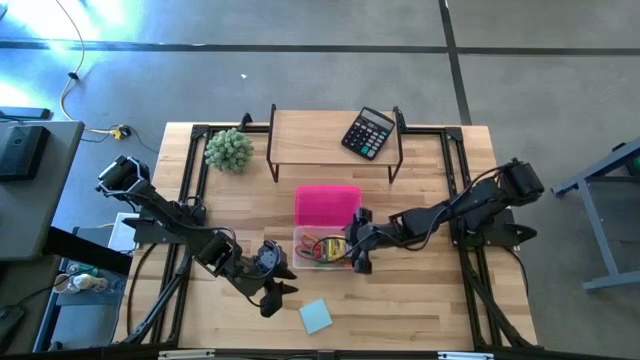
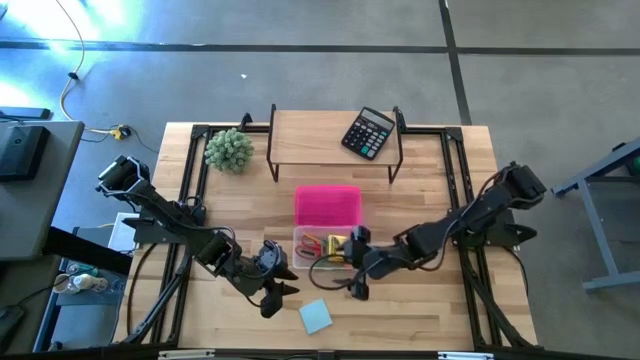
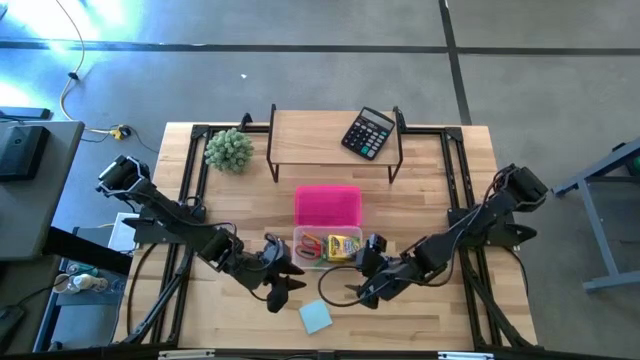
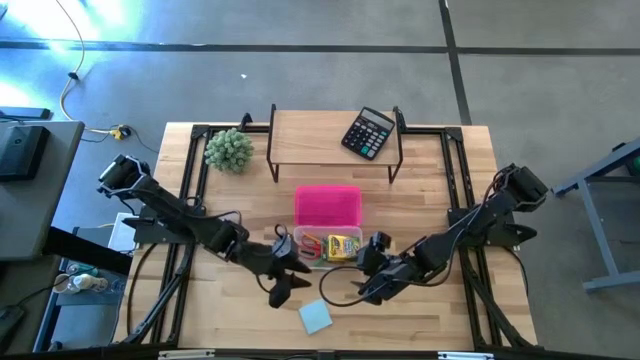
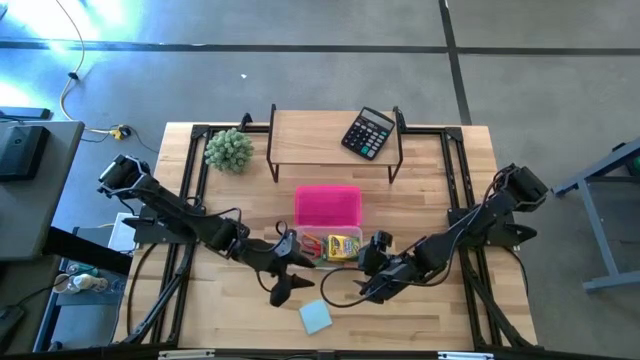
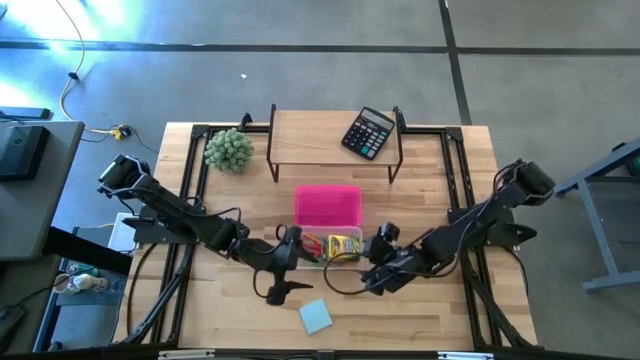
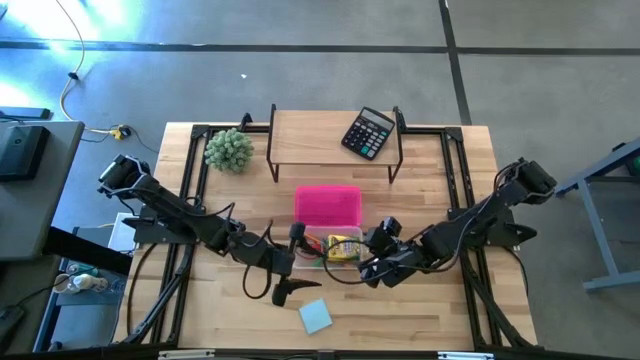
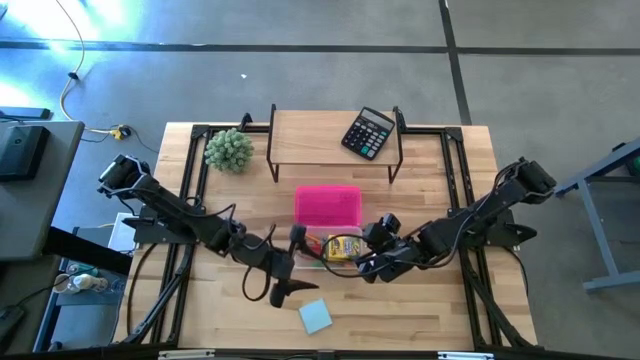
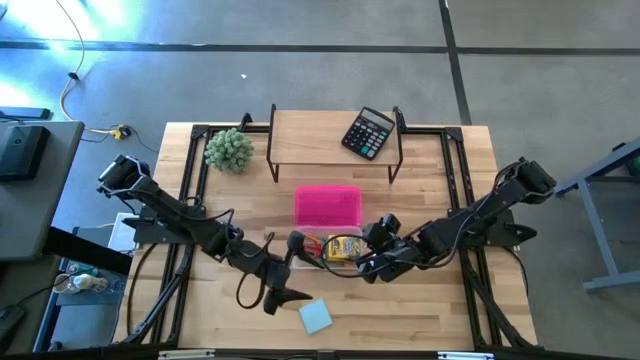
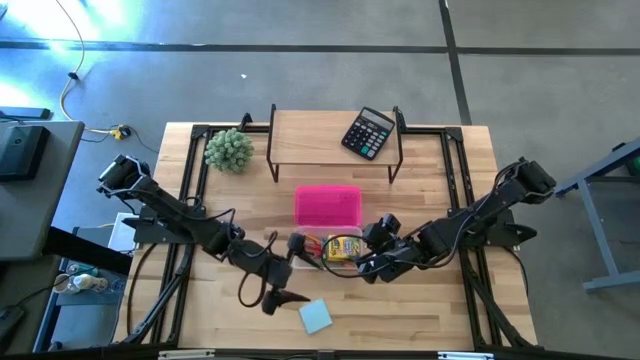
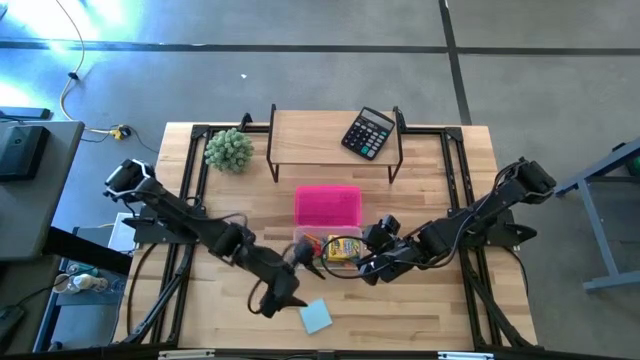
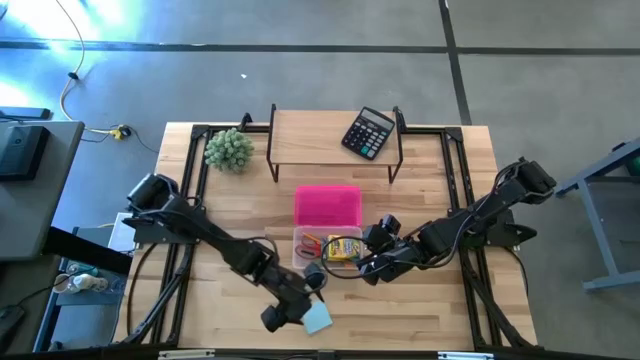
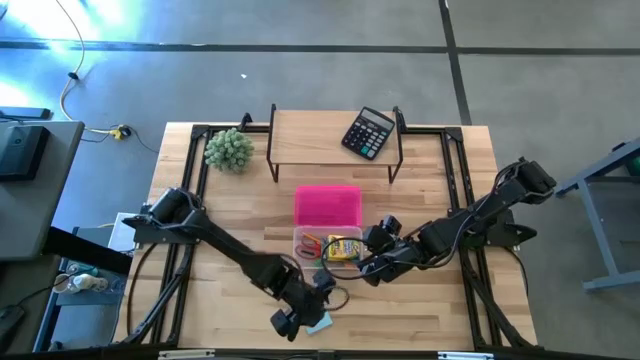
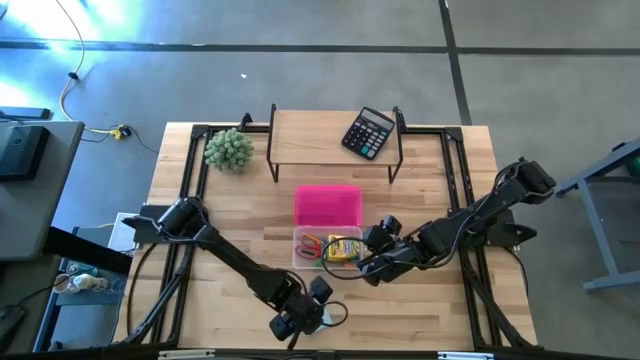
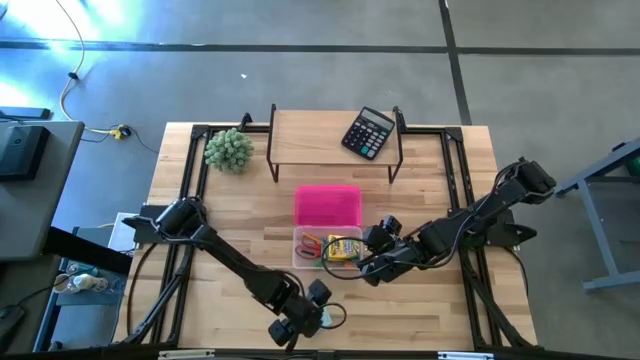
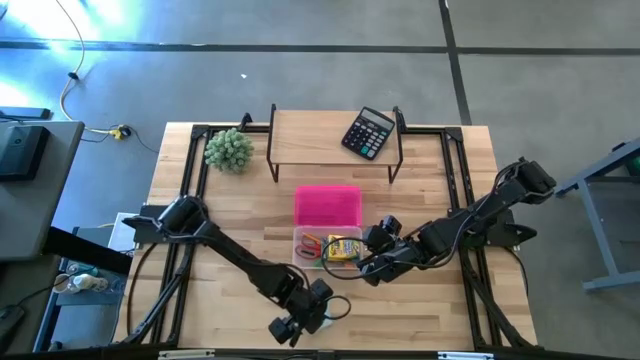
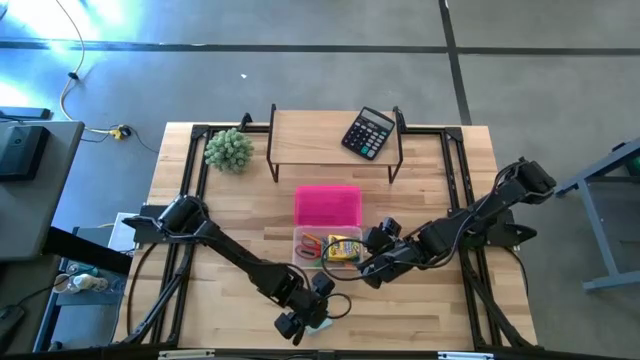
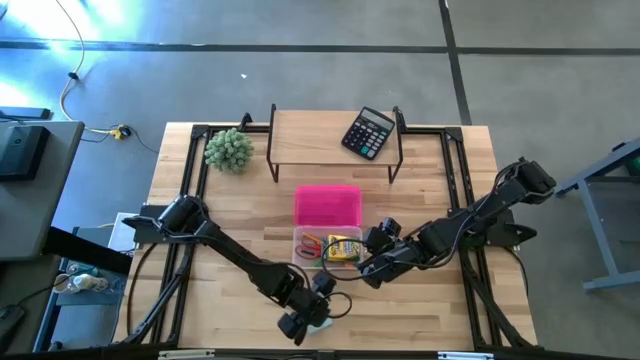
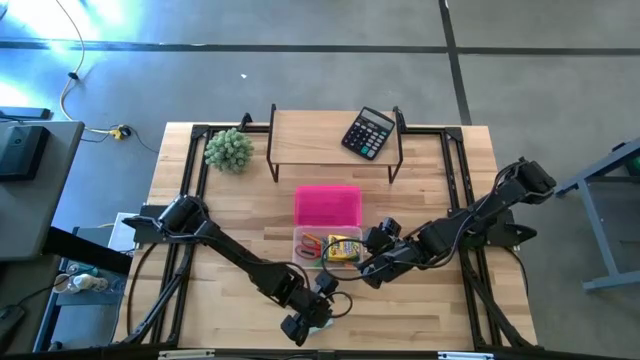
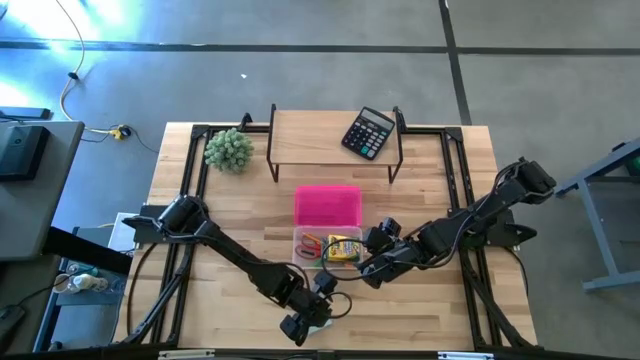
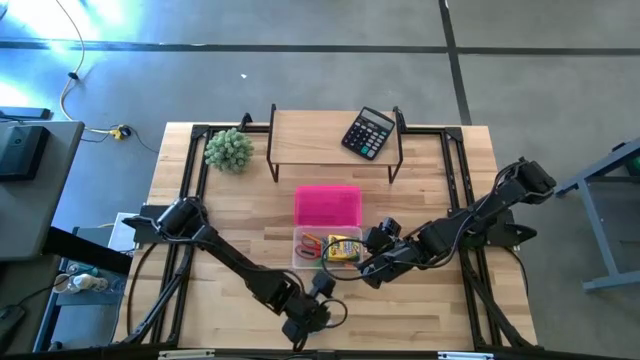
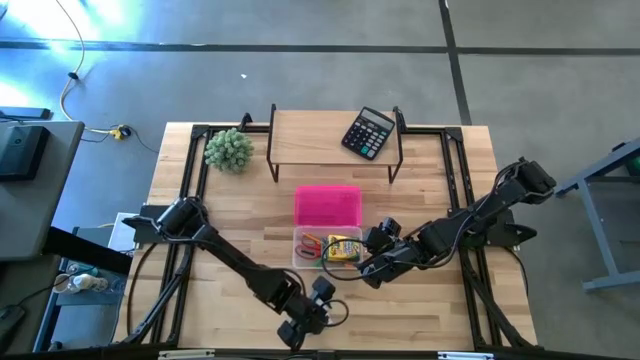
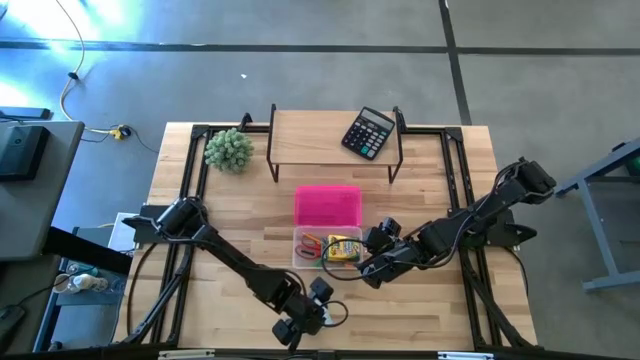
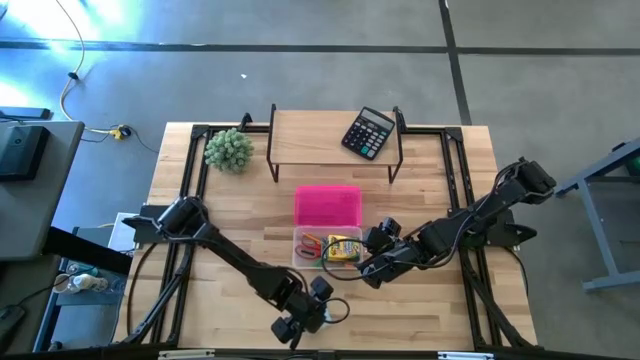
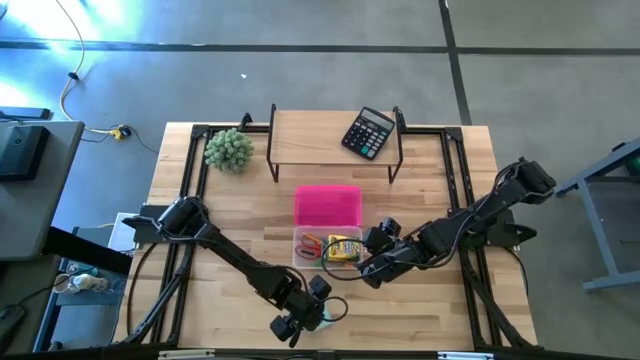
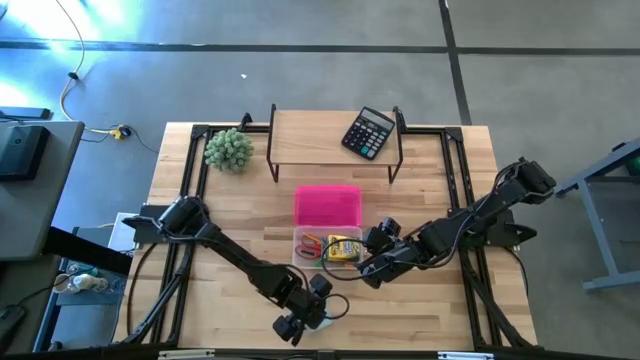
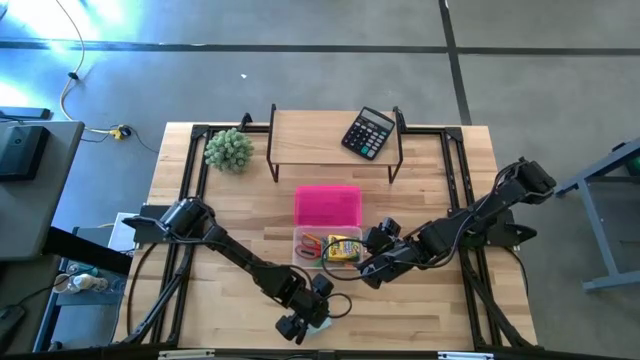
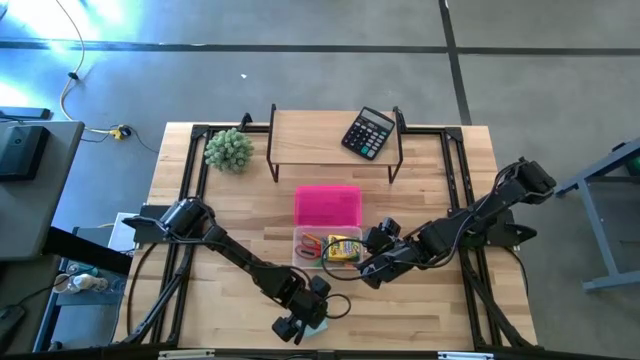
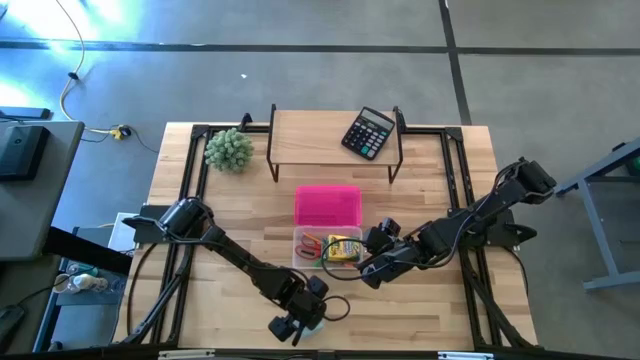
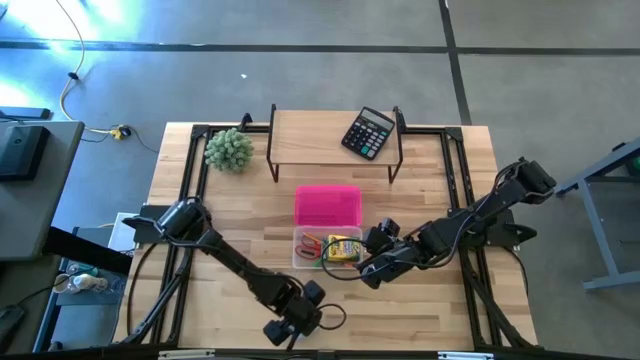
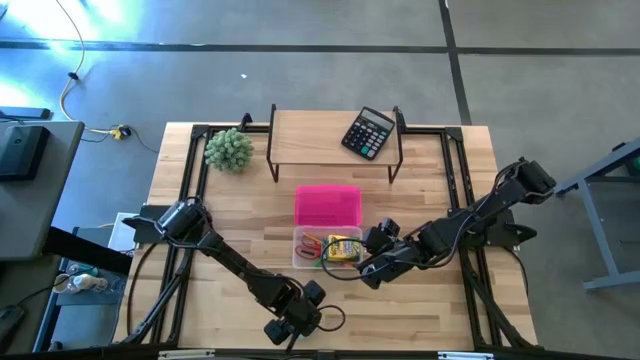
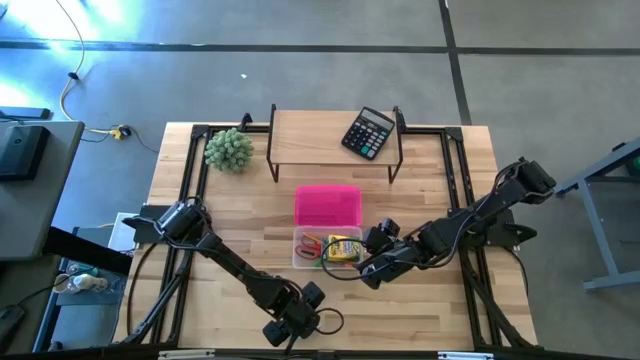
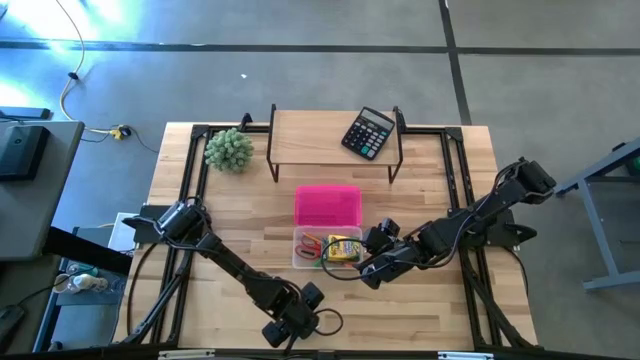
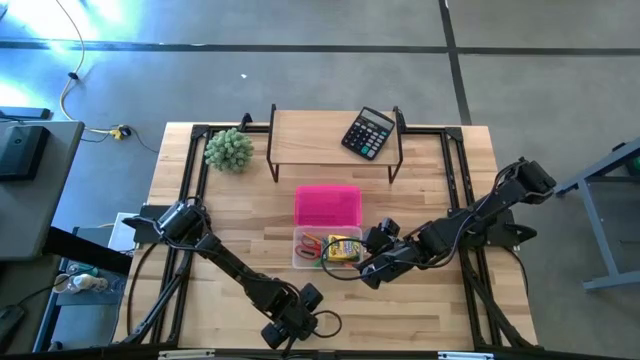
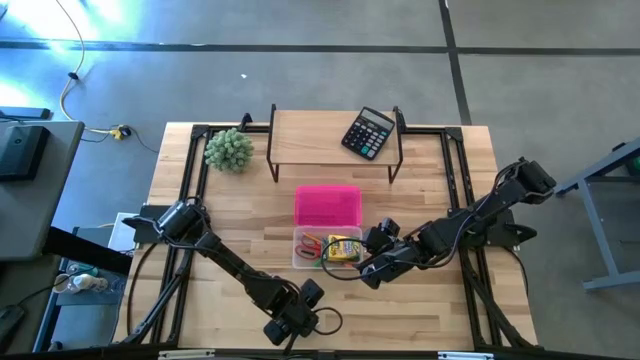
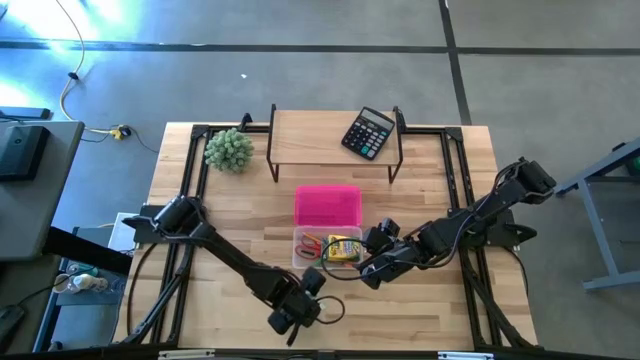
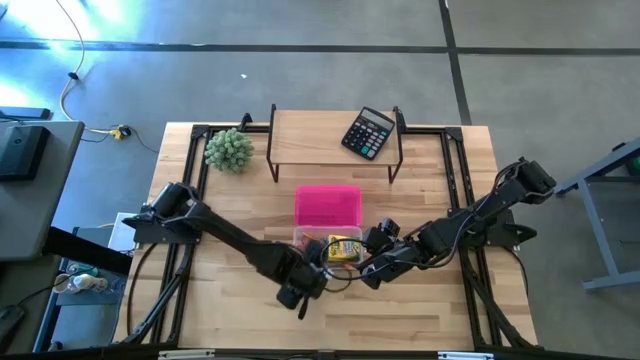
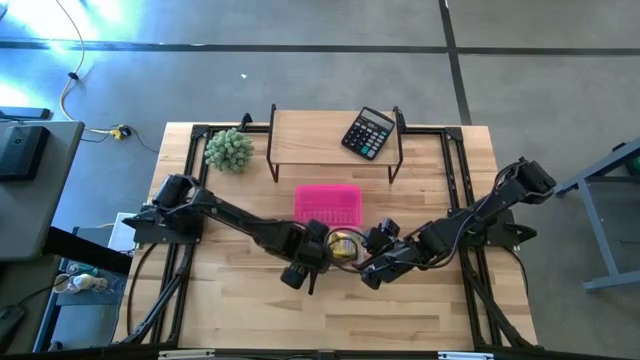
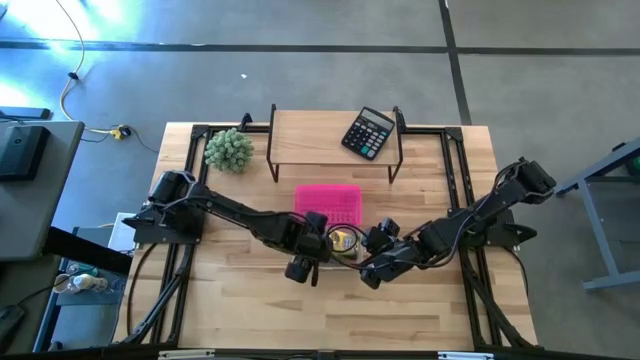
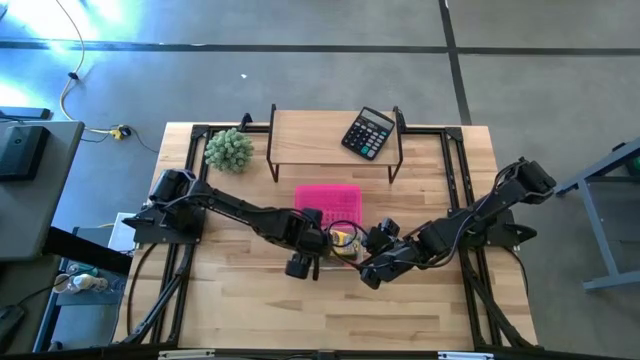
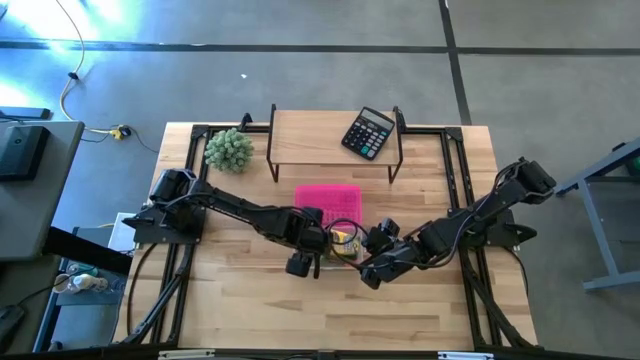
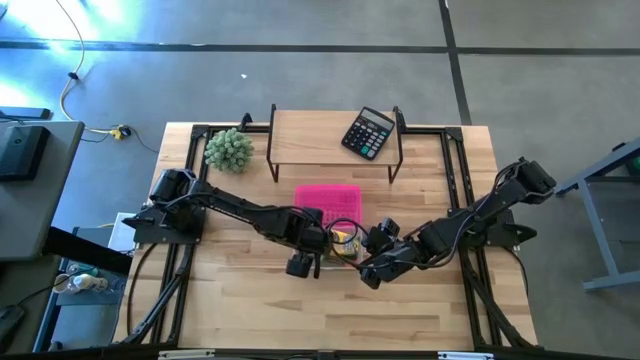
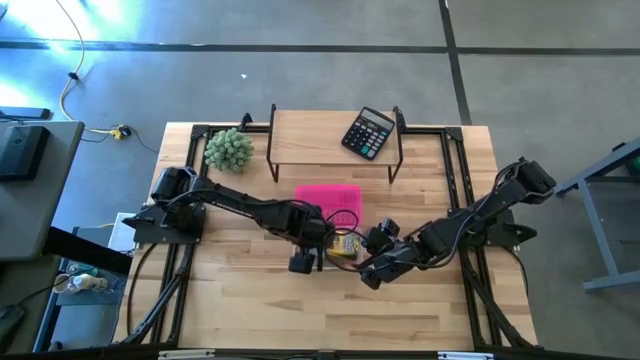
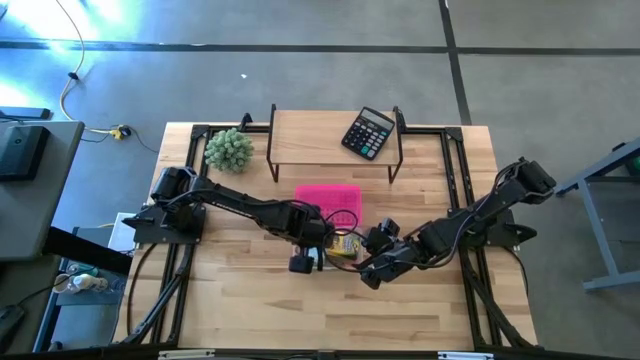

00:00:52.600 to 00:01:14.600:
Task: Pack school essentials
Put the blue sticky note pad into the supply box
